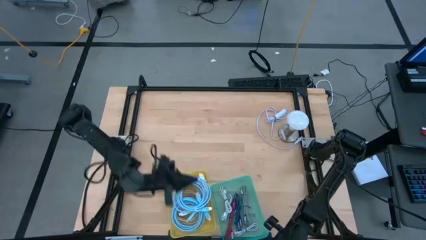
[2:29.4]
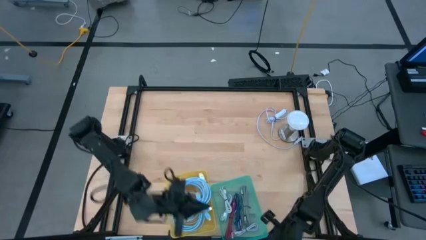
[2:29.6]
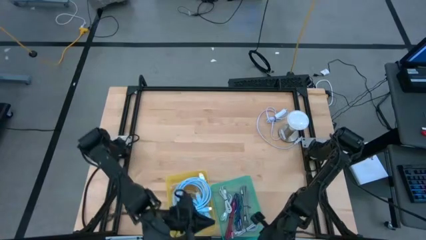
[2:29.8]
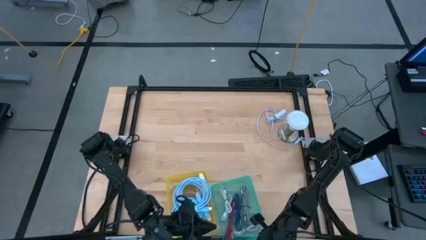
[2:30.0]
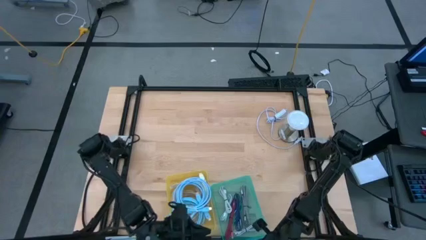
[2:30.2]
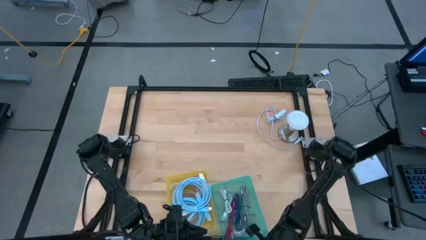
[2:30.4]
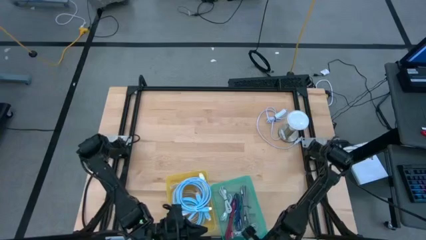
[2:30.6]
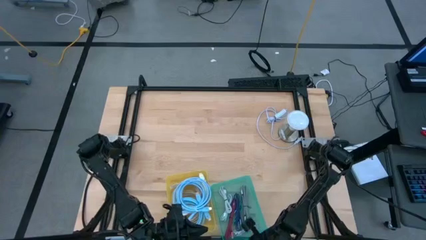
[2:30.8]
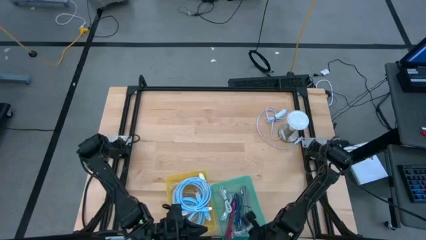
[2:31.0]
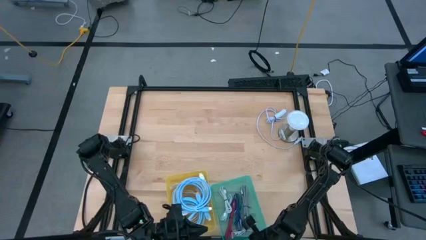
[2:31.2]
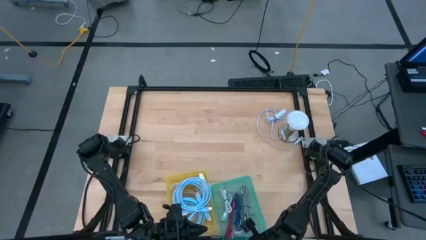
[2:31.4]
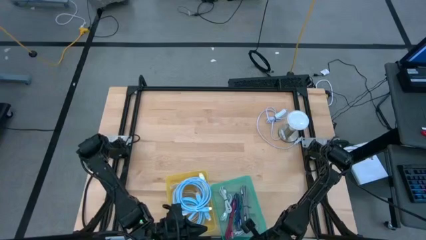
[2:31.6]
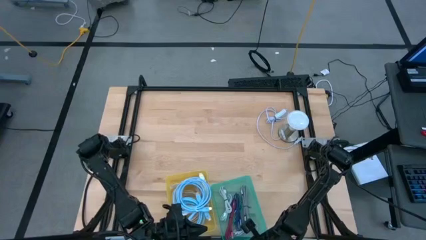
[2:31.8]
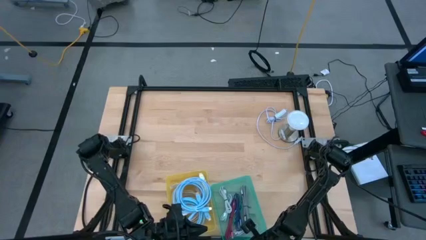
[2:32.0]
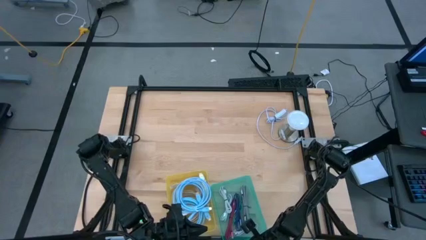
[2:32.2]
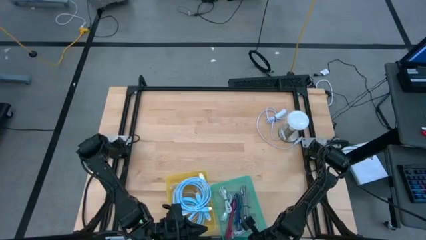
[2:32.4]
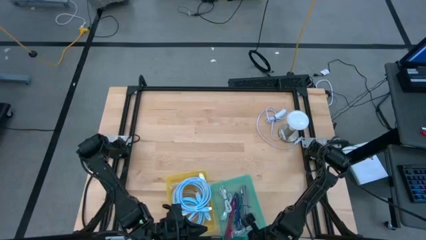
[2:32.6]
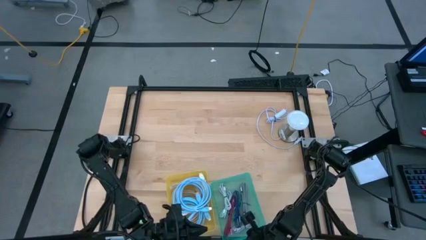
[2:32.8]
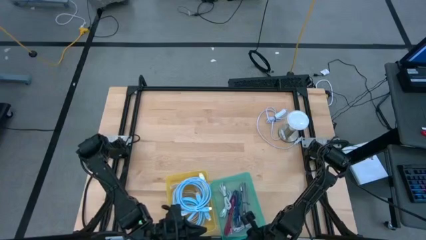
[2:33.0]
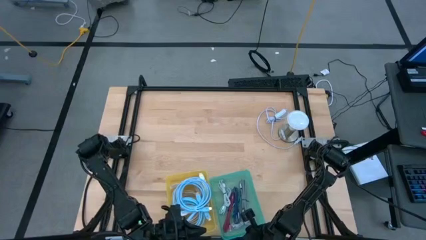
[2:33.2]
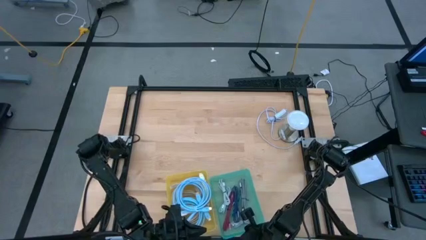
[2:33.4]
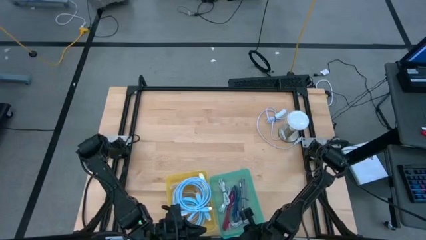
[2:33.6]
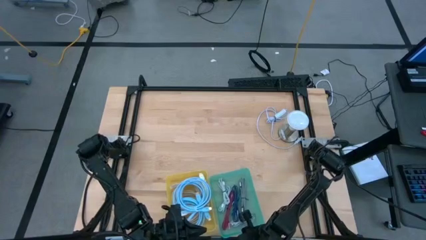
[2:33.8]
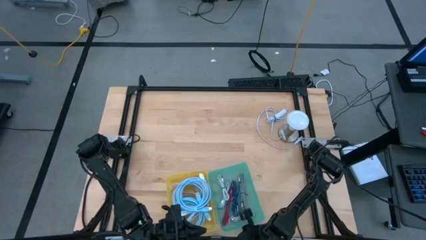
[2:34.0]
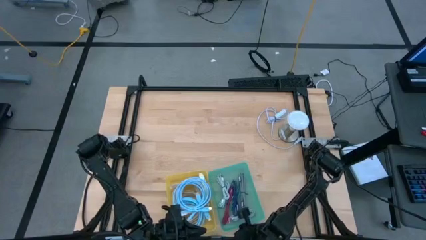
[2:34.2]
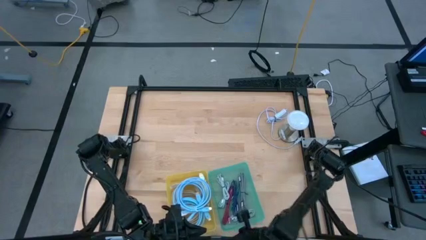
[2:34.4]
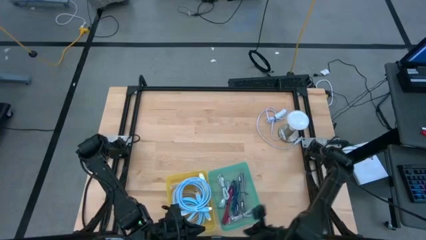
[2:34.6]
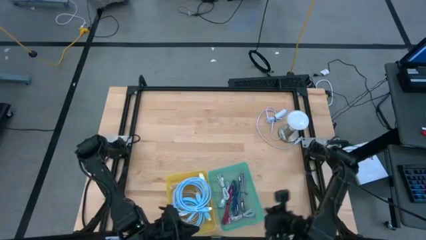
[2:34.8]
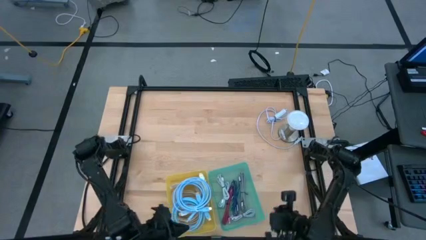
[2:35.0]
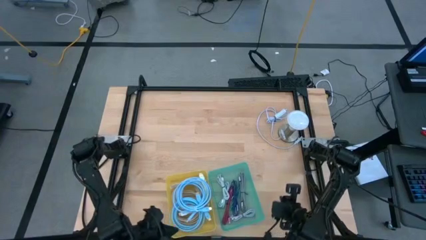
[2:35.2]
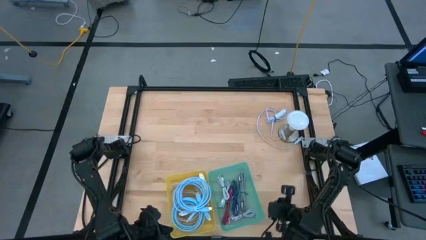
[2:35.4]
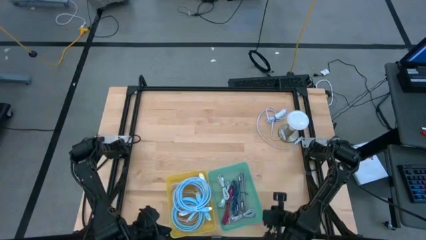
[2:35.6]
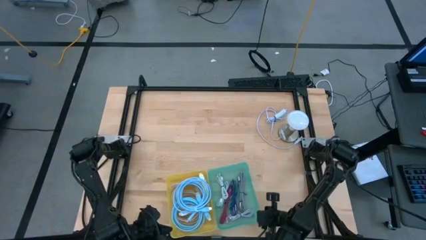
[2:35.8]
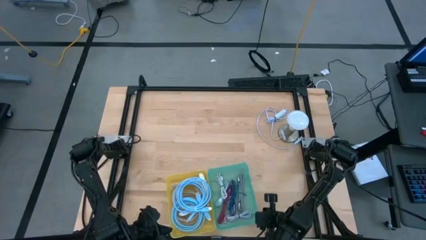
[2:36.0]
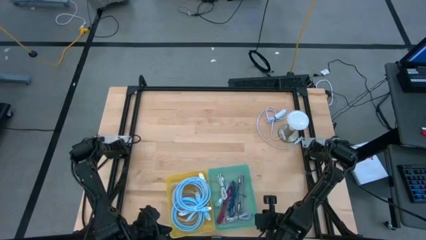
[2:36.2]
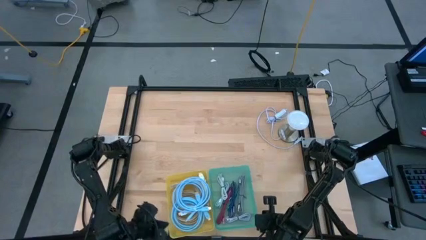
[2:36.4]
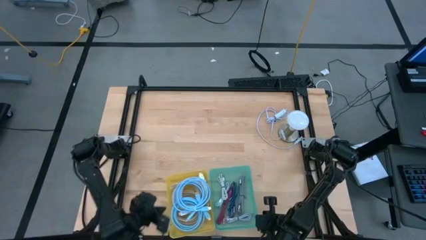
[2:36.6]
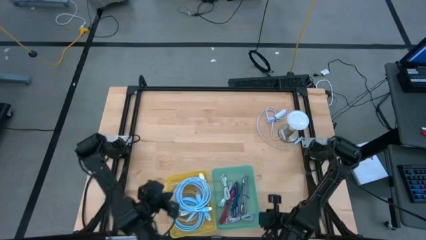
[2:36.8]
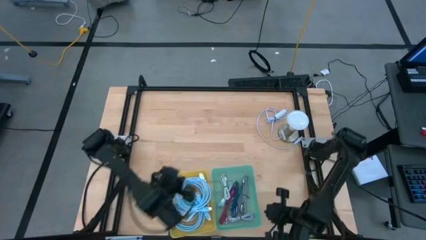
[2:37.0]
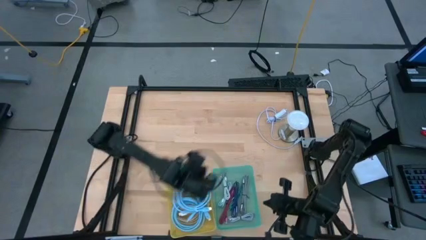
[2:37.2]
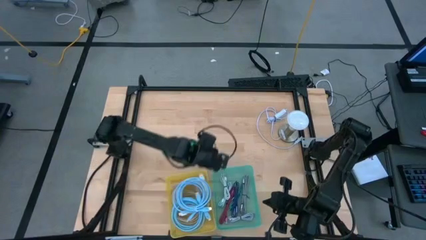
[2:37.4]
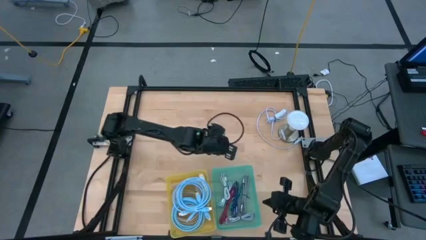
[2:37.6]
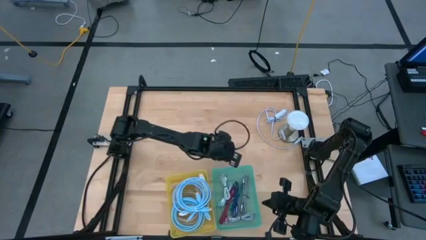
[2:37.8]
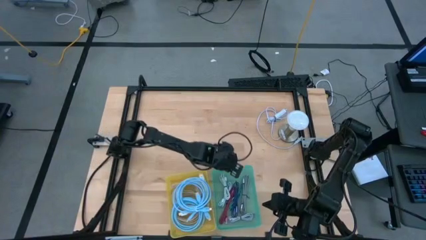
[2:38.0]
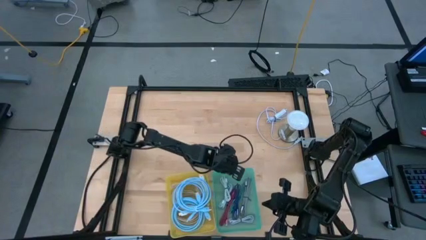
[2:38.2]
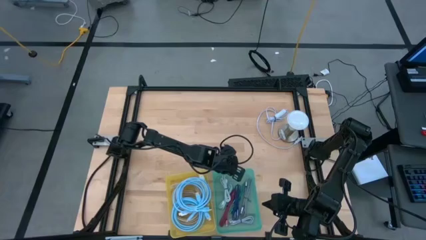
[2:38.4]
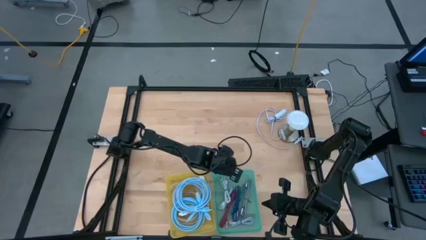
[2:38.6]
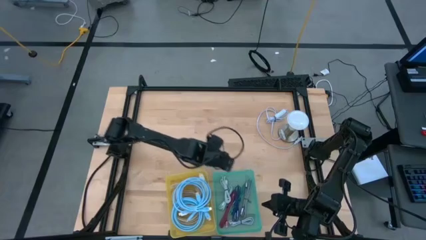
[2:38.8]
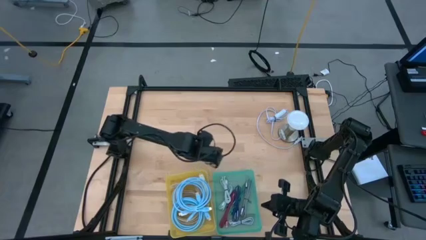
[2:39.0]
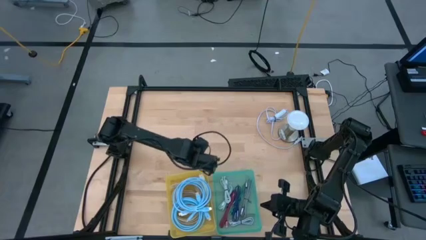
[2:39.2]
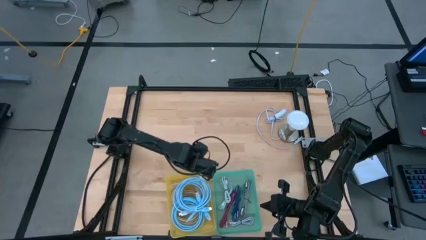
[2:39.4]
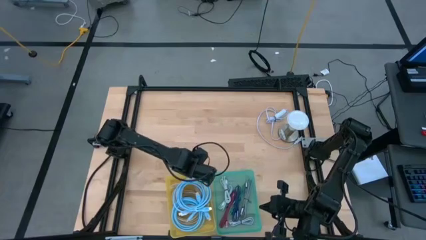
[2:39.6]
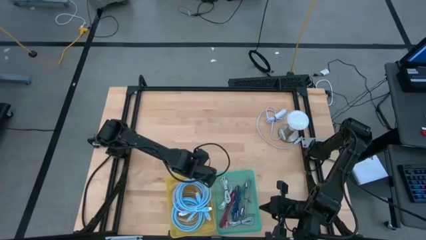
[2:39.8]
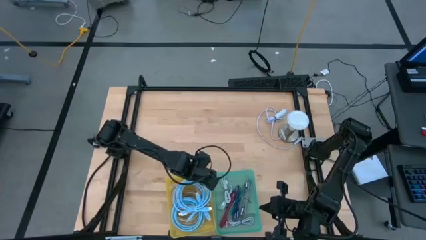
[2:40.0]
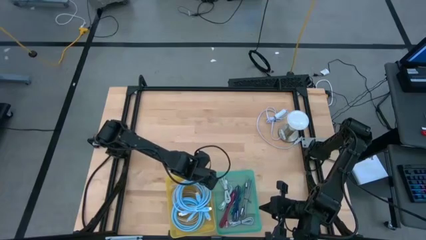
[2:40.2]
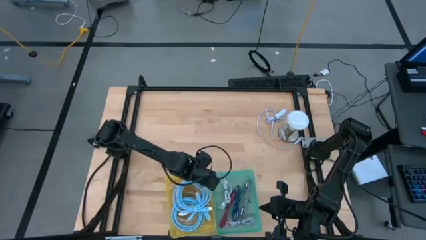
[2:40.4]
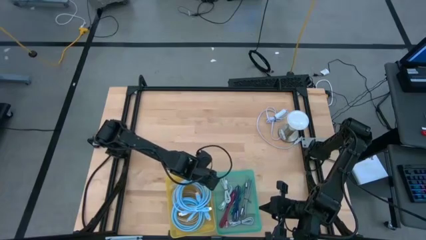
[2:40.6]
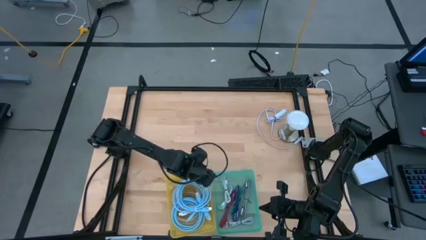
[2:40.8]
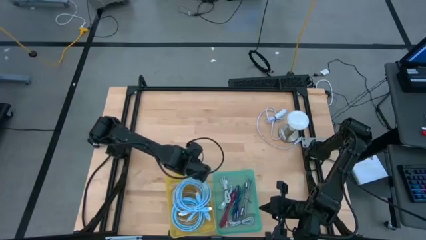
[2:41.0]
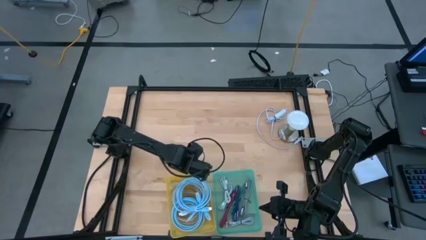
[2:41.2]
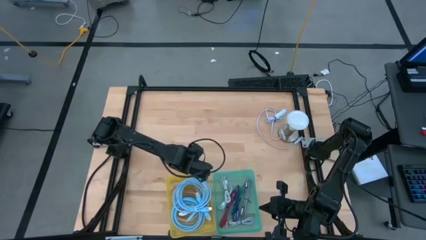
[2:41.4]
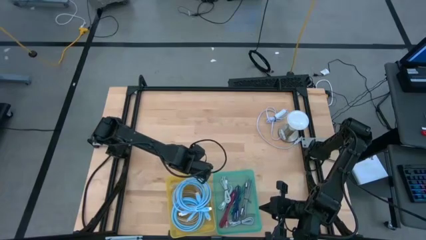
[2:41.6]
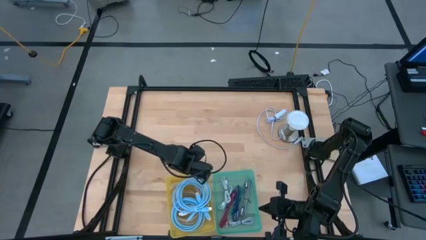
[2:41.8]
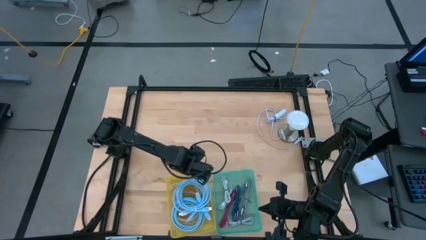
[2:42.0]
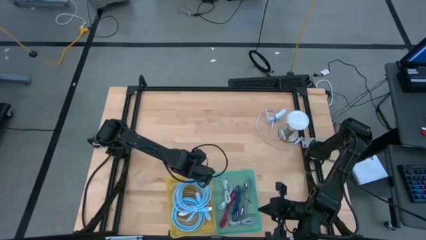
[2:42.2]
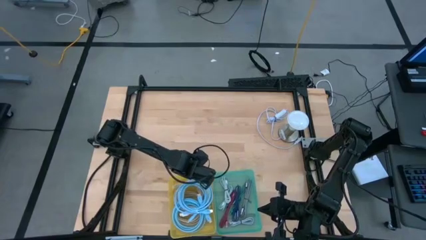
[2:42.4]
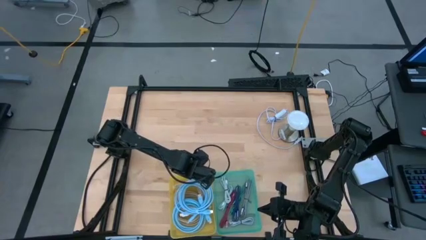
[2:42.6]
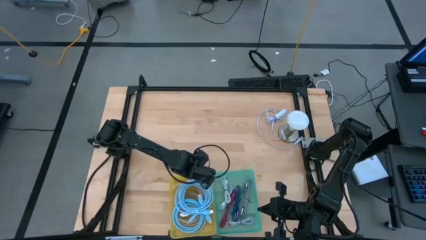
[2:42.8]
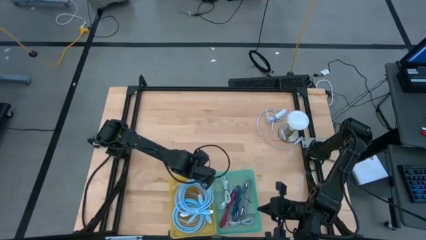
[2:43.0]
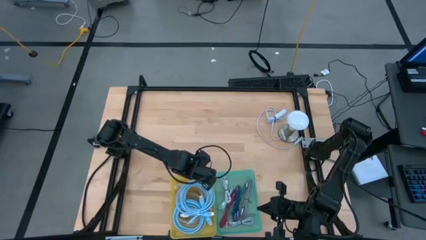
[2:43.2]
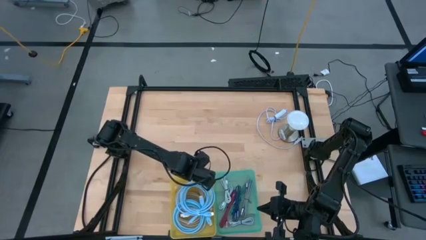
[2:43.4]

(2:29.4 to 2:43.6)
Task: Pick & Place USB Port
Adjust the bins
